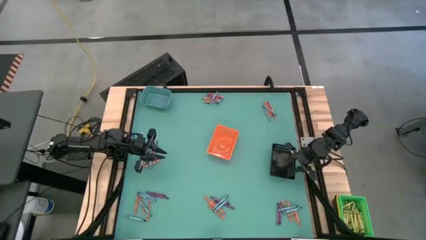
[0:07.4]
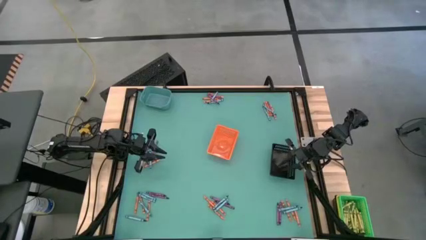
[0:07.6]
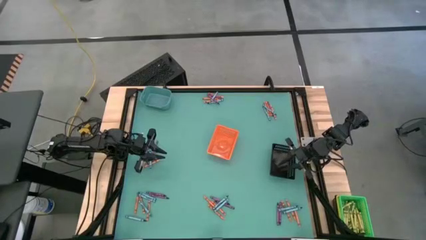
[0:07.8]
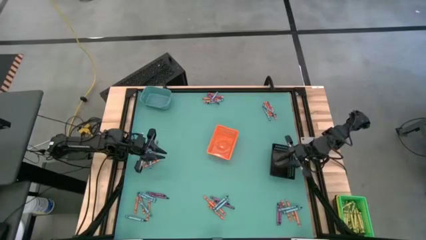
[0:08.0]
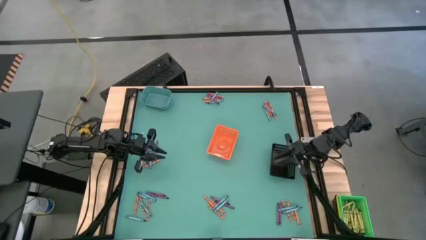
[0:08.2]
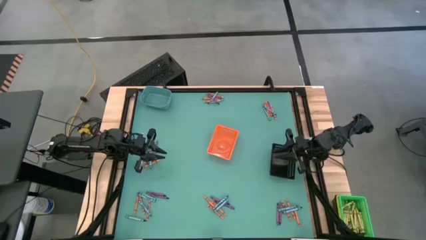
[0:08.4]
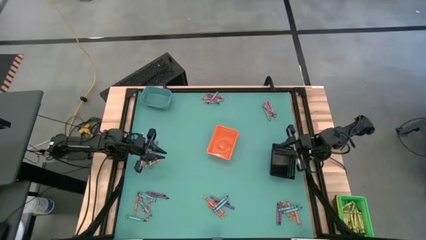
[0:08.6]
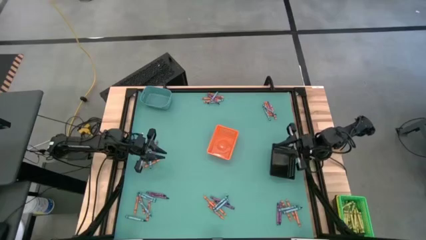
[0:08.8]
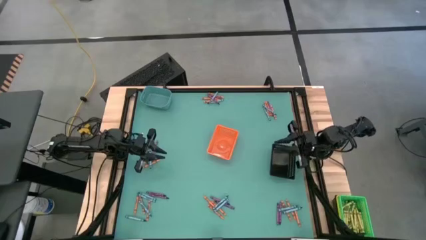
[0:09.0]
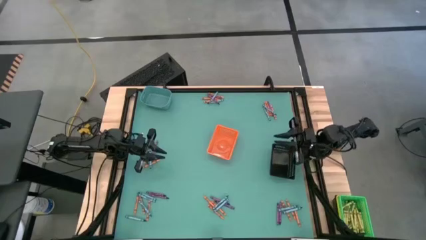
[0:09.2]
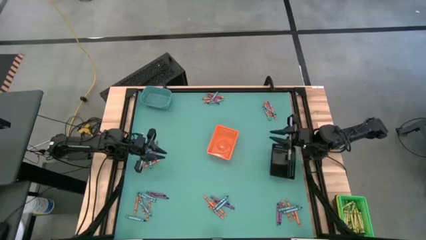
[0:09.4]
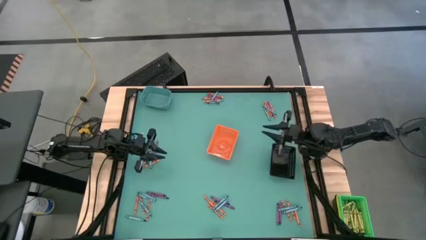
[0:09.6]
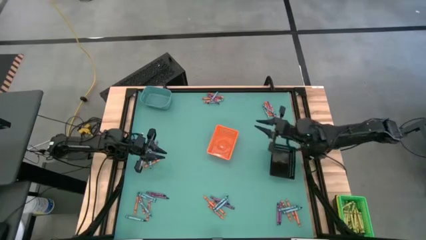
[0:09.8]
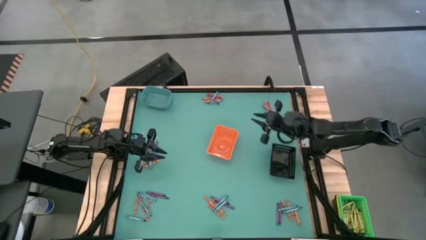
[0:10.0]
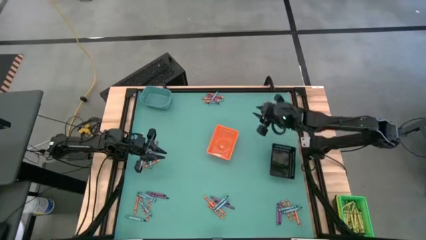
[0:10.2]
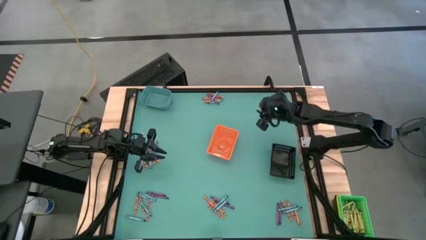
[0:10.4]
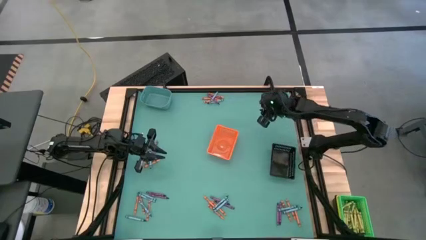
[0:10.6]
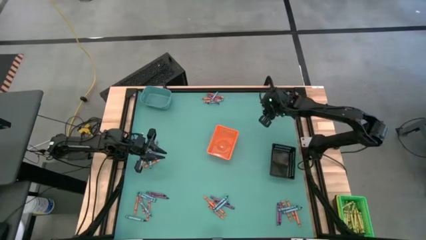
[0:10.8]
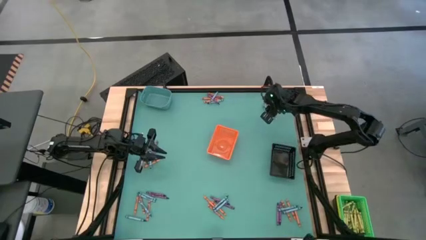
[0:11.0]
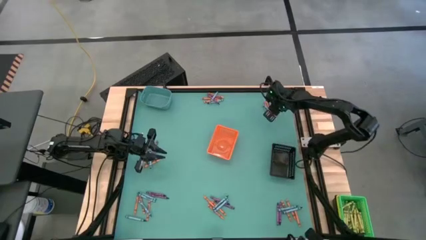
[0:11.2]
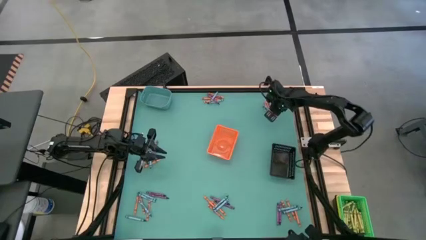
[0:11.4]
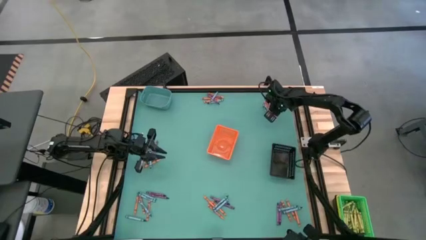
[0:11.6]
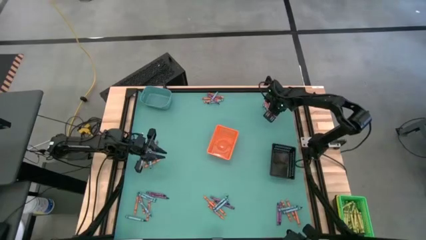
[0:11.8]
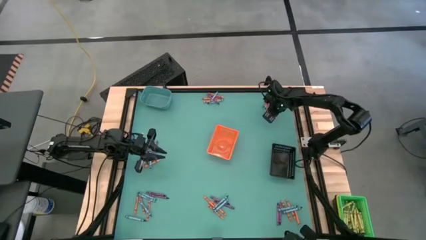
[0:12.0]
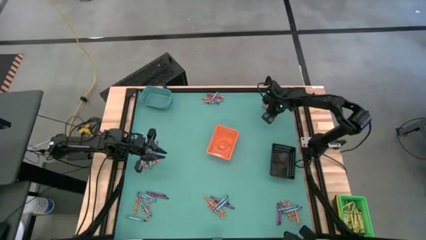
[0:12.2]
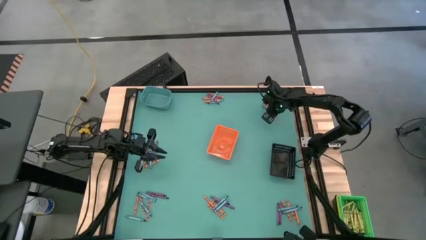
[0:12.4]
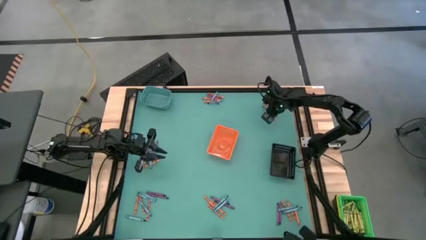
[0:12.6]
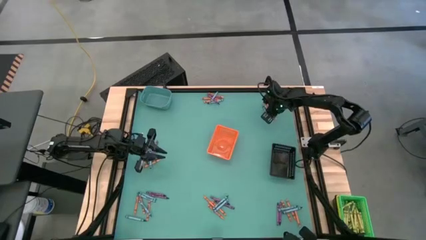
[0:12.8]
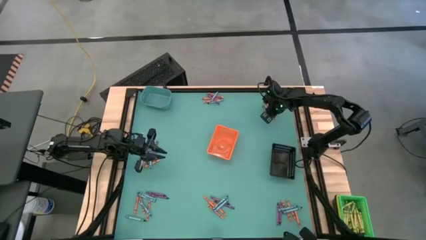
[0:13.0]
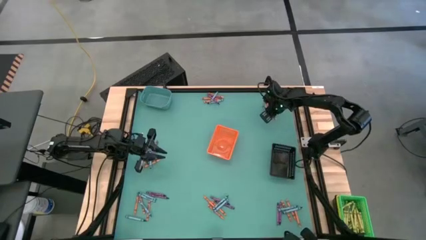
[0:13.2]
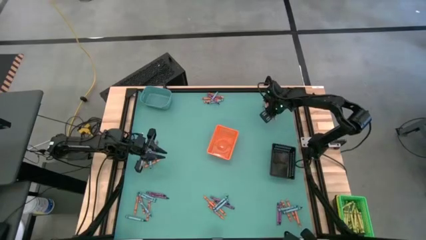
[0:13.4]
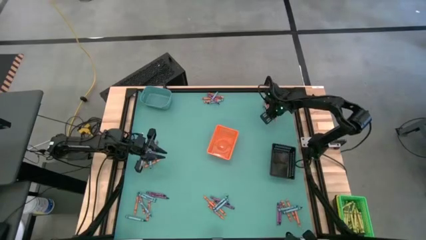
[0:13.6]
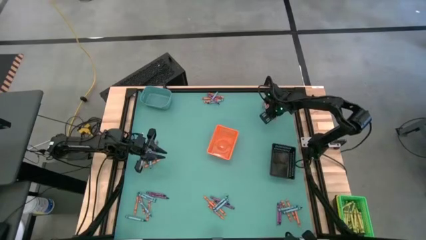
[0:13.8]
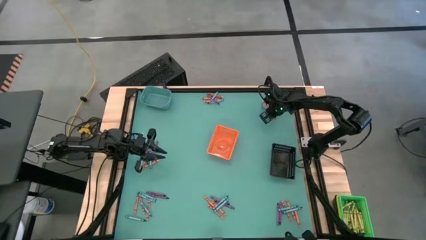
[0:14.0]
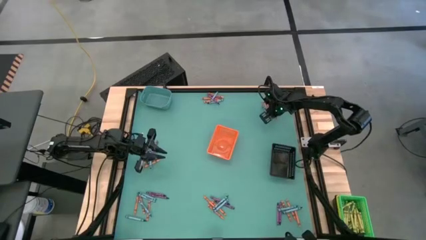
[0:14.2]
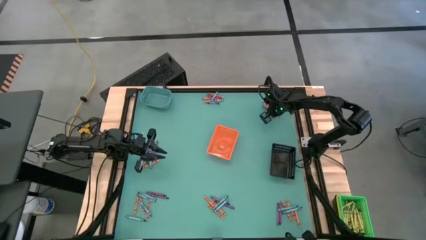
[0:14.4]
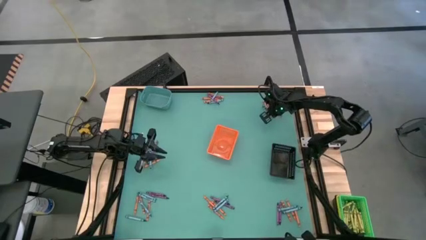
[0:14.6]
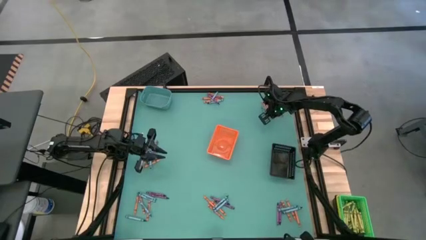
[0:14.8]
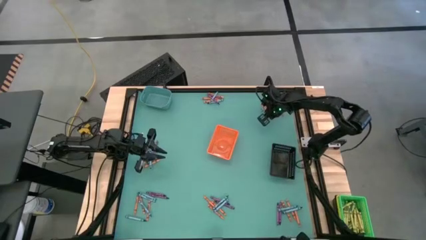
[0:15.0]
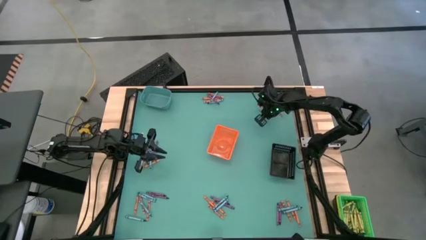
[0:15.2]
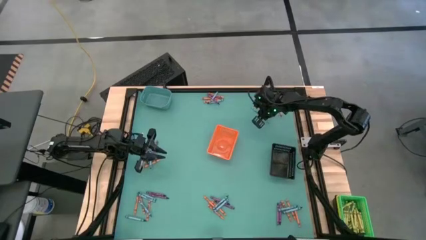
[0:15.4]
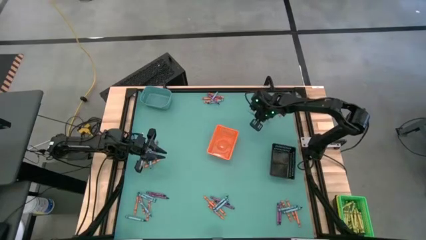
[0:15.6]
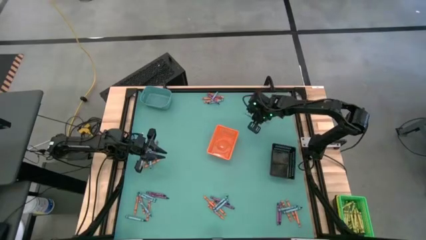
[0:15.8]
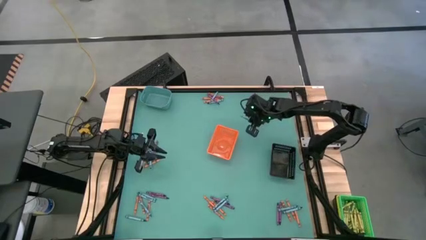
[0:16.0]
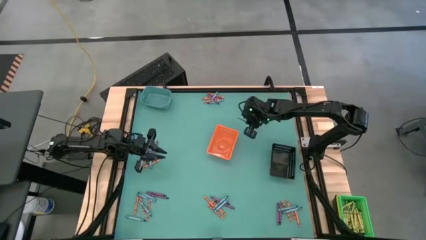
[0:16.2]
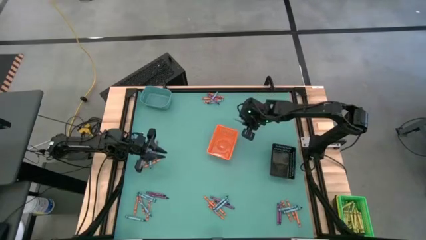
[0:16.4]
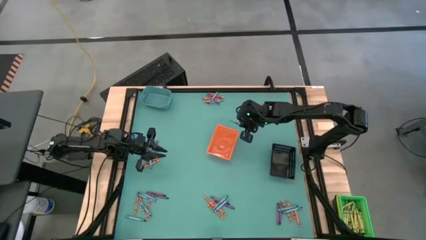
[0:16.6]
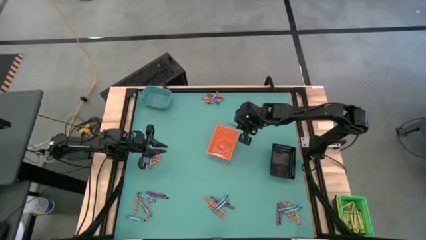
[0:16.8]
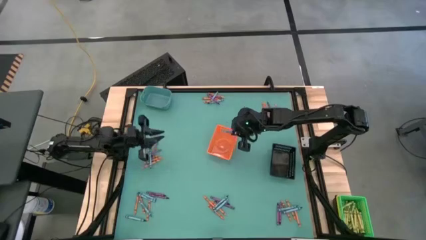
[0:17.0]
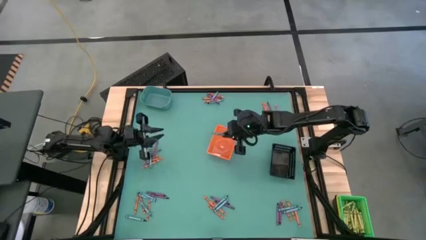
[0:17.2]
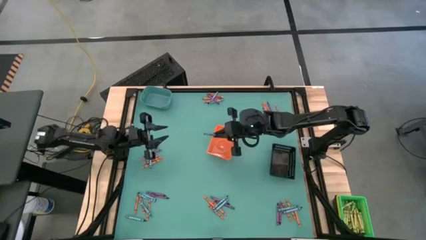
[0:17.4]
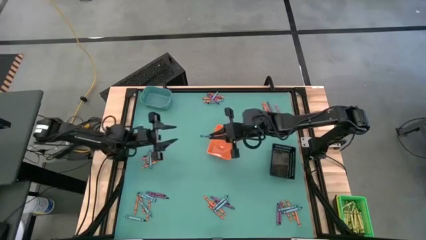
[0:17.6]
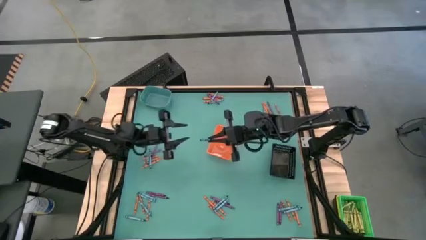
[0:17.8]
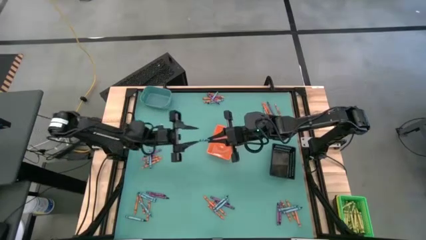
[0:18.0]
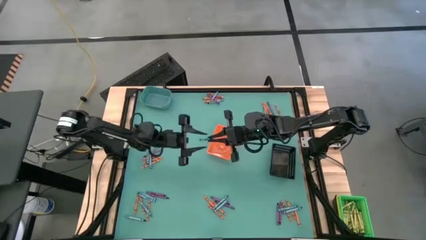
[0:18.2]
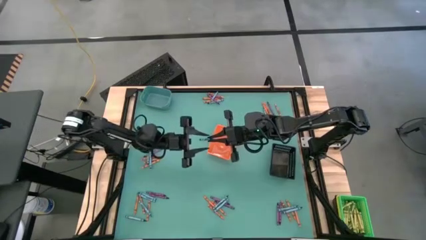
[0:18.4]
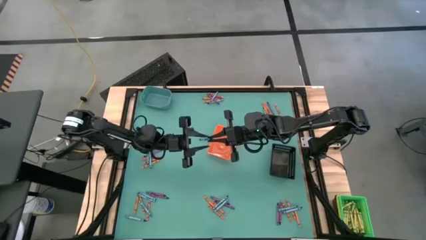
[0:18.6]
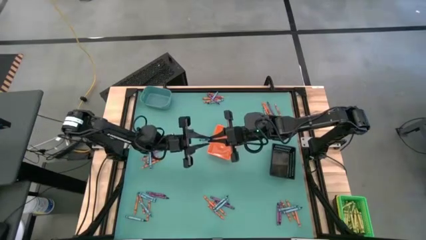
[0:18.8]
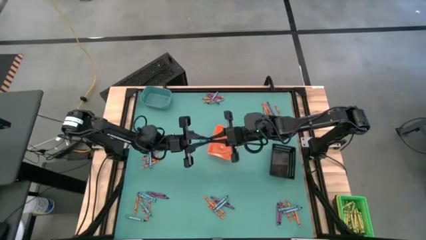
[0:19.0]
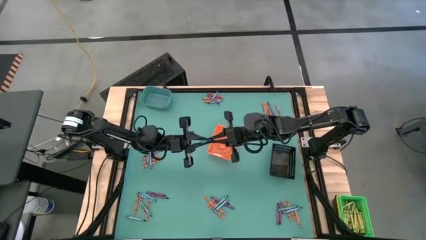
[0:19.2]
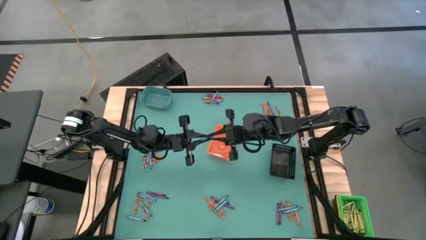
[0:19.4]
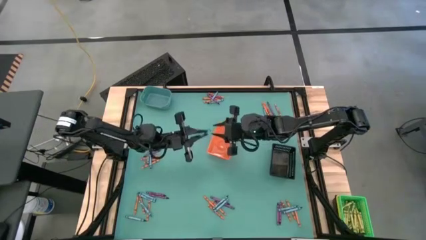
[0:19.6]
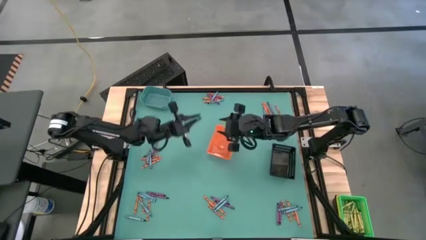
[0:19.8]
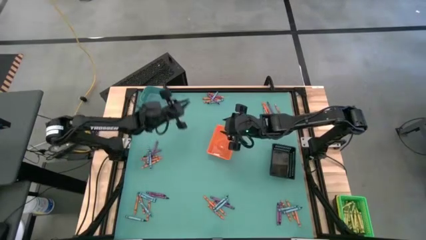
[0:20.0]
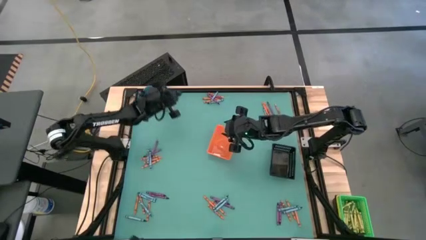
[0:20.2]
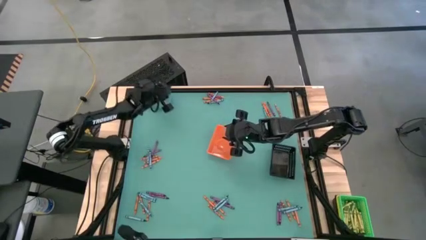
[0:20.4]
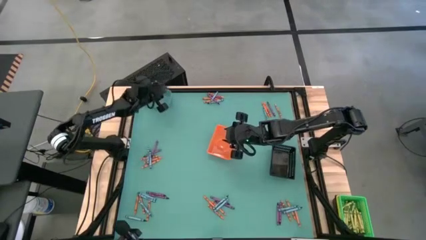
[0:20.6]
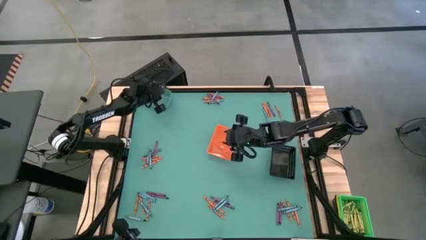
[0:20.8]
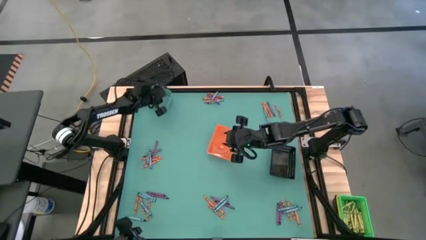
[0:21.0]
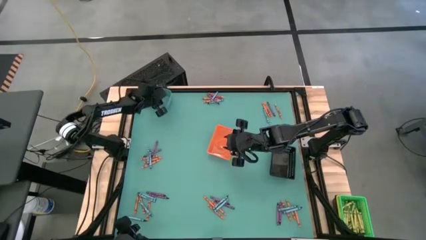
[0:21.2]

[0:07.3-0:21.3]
Task: Sort crayons
Put the blue crayon into the blue bin
